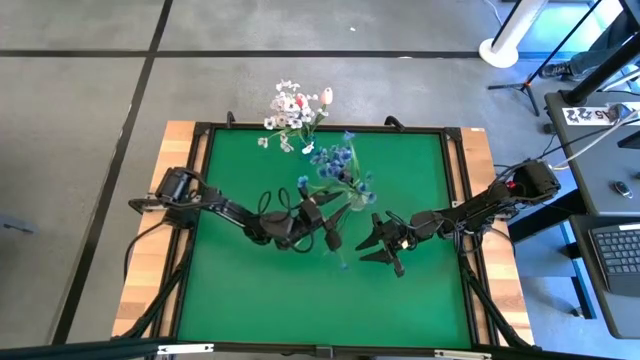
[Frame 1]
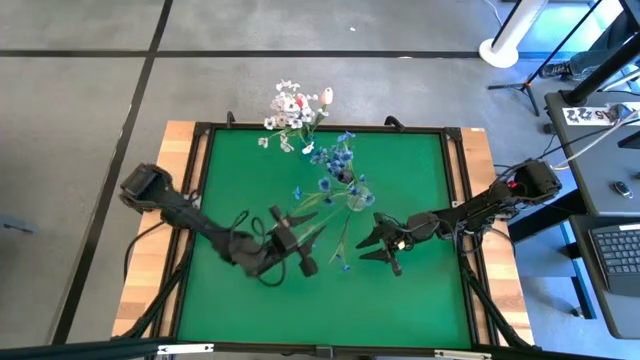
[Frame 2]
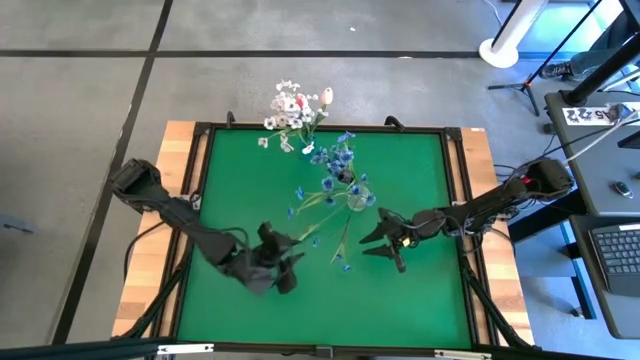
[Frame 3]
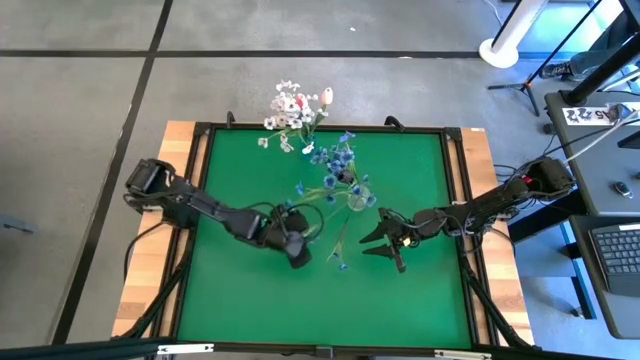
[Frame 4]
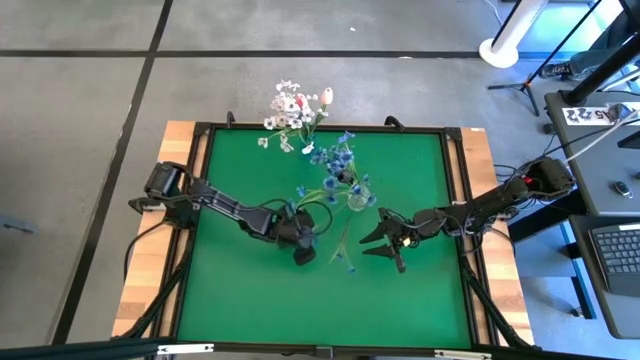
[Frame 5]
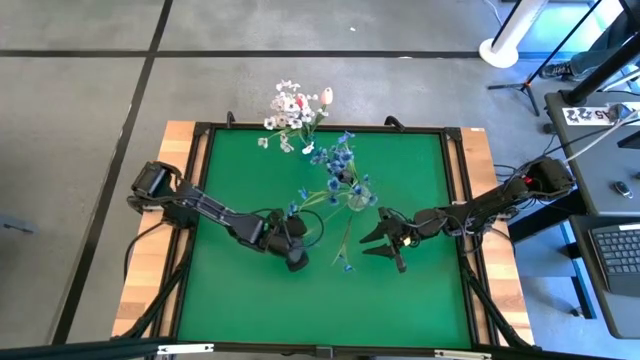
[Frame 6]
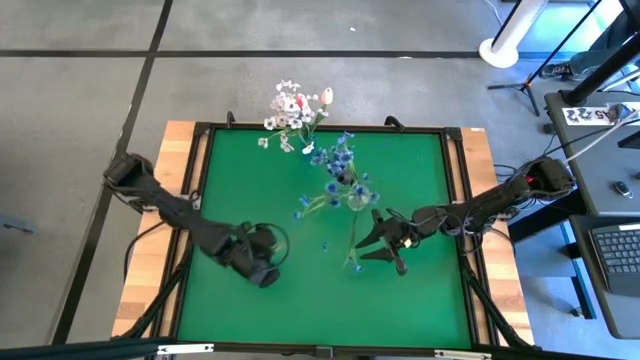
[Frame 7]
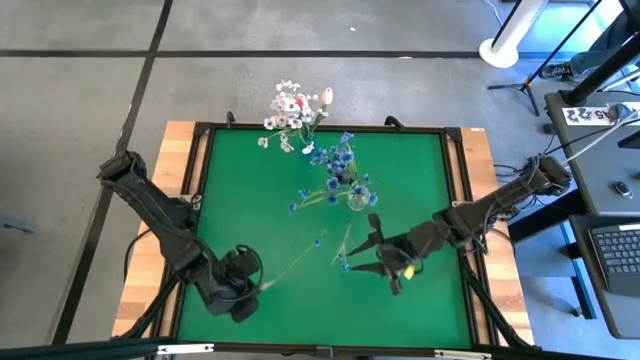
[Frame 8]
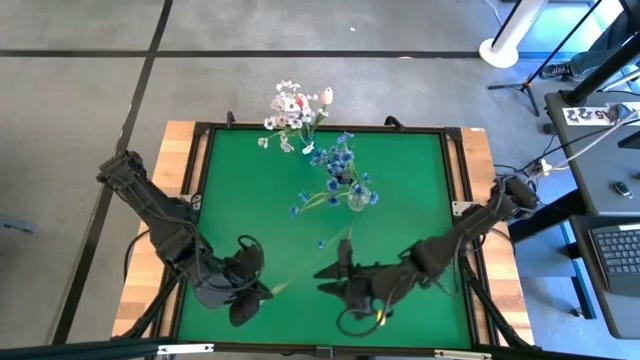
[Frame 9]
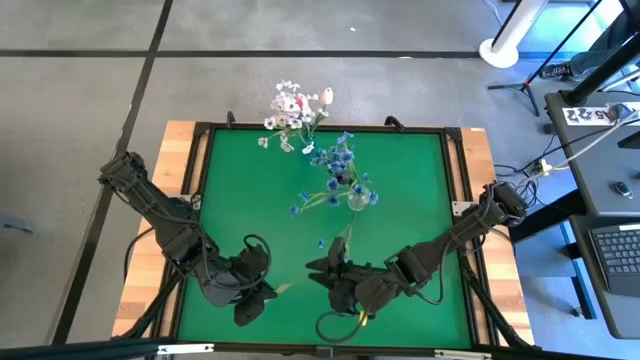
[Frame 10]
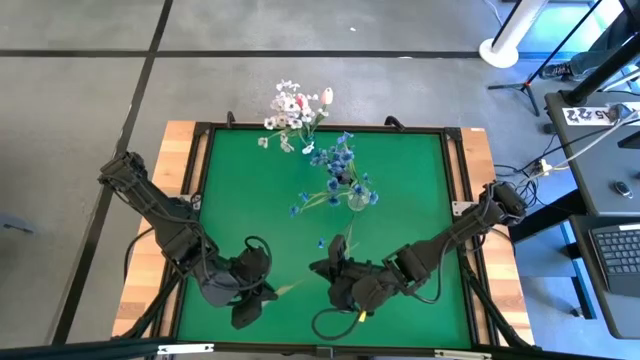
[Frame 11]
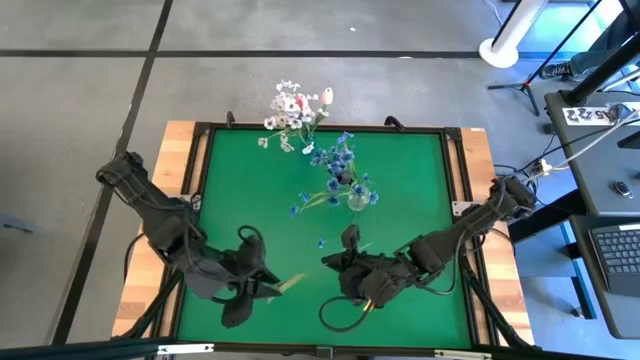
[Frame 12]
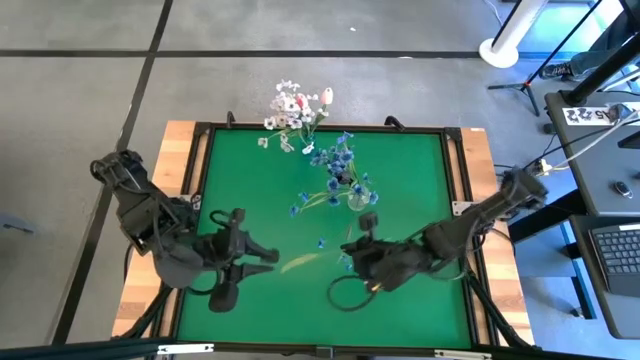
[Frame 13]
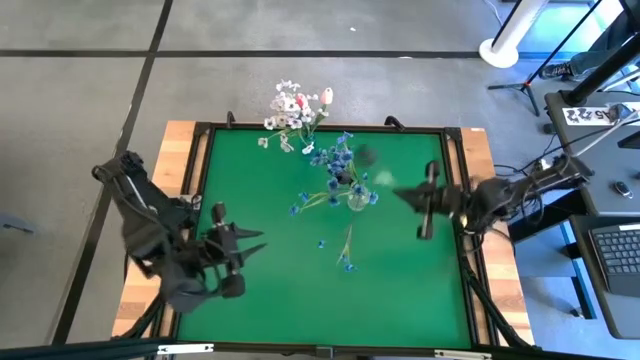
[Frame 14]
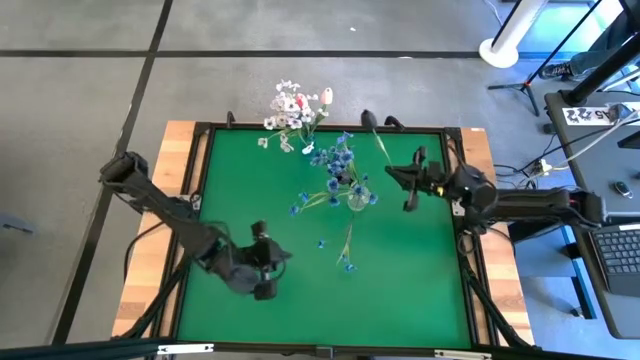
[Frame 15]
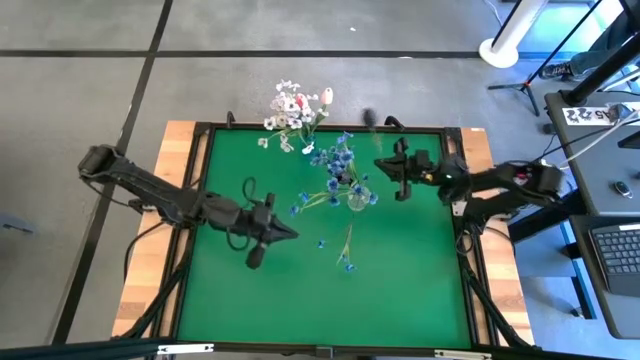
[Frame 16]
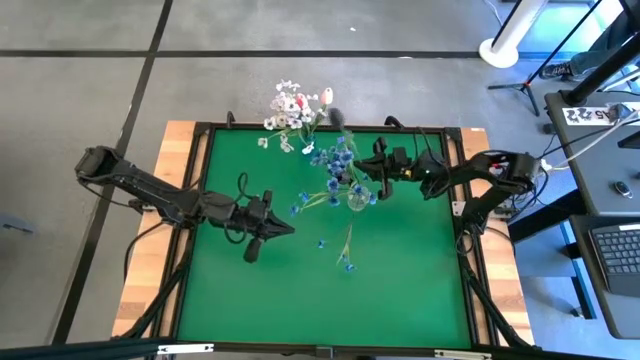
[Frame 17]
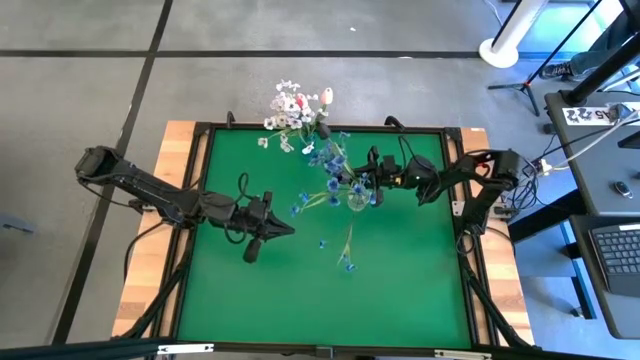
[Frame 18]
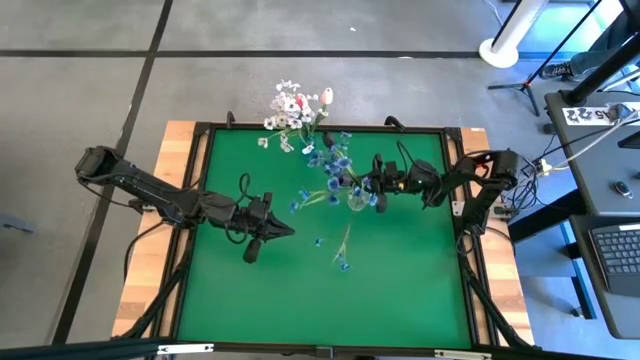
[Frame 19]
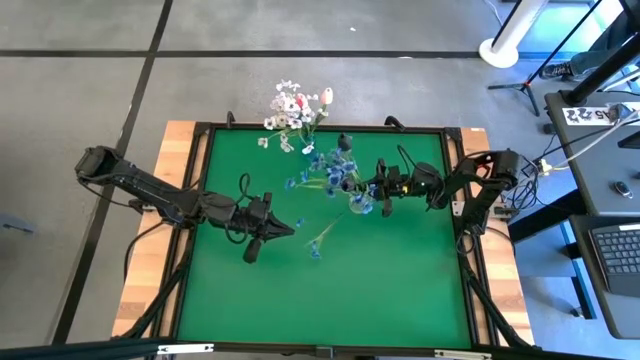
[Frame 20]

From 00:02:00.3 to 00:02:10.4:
Task: Sort flowers into vase by color
Put the black flower into the transparent vase

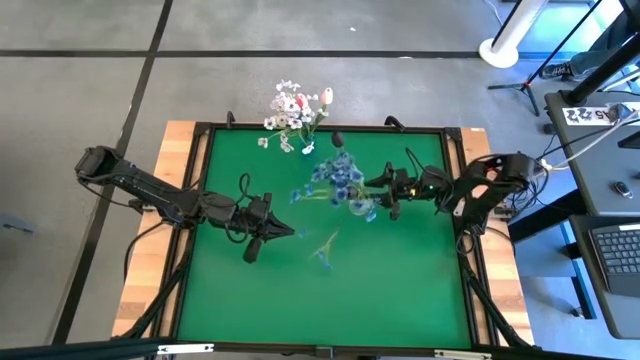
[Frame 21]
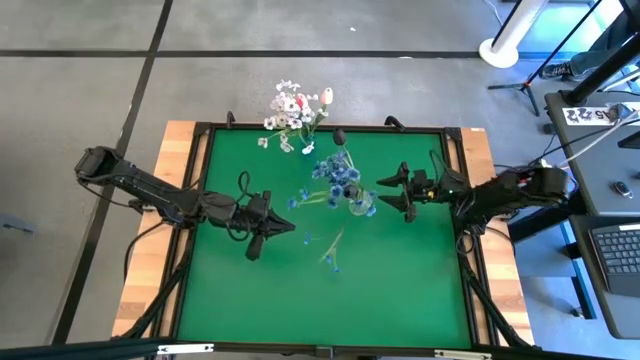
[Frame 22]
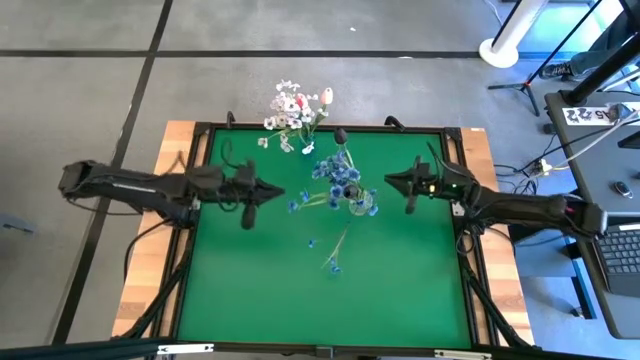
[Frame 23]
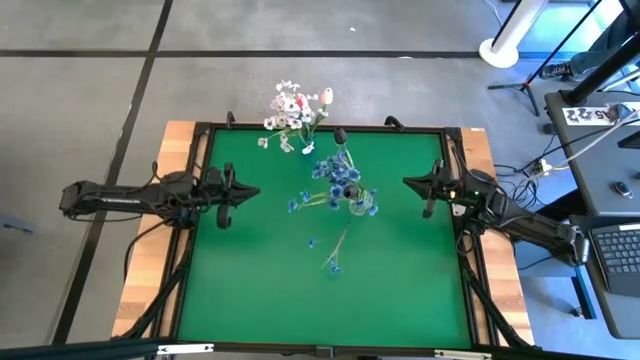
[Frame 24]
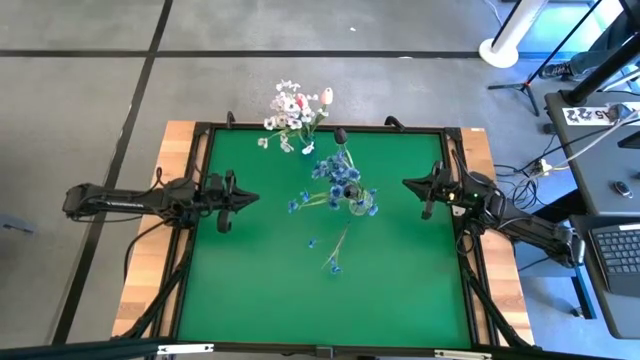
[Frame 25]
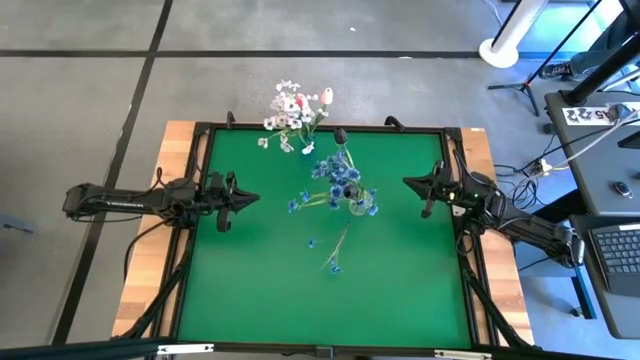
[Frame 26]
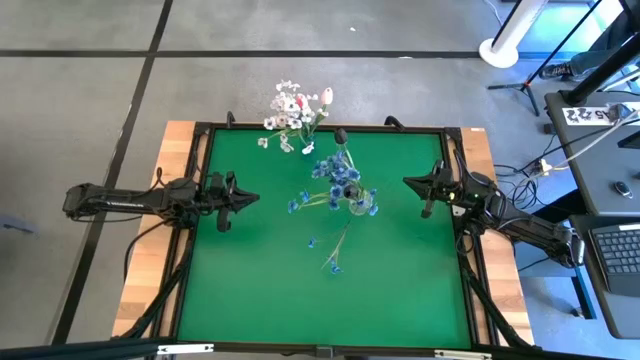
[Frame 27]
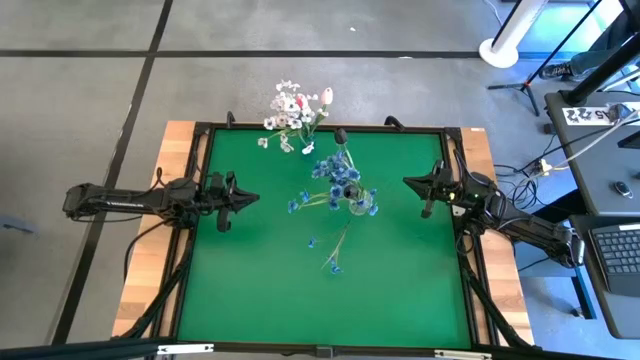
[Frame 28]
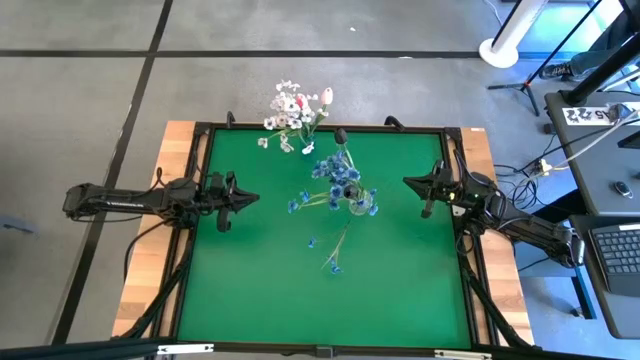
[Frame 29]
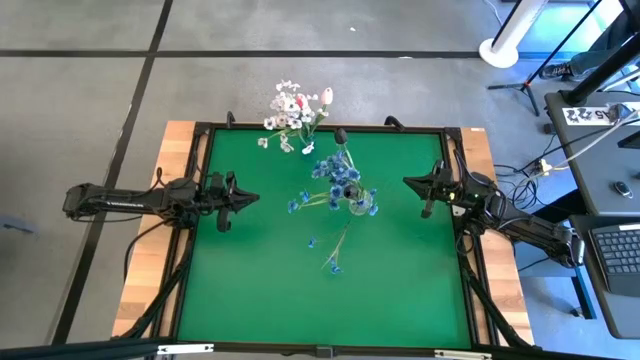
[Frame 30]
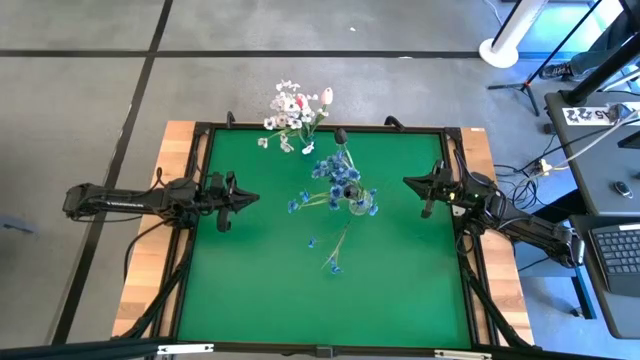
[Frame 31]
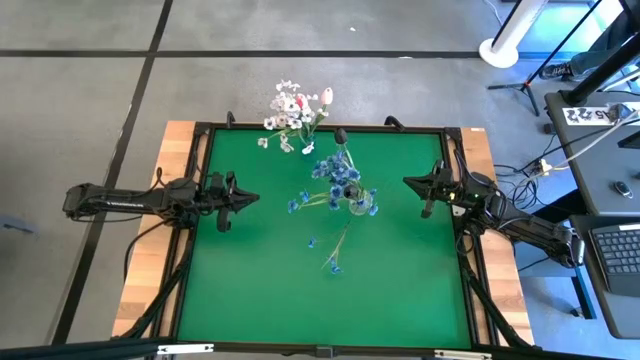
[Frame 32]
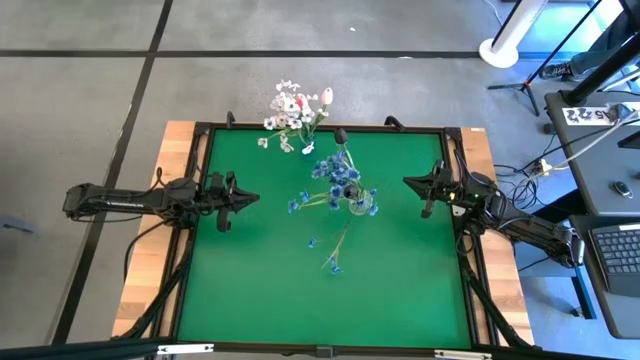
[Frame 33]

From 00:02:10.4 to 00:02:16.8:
Return to Home Position

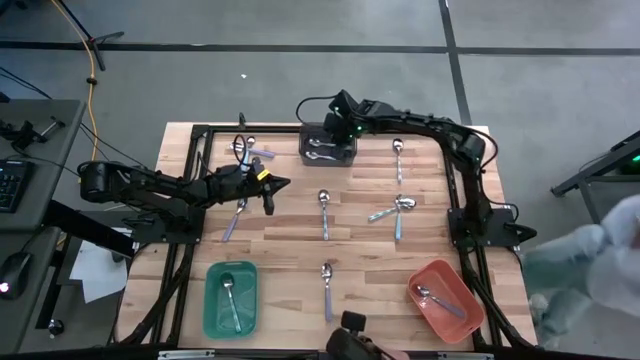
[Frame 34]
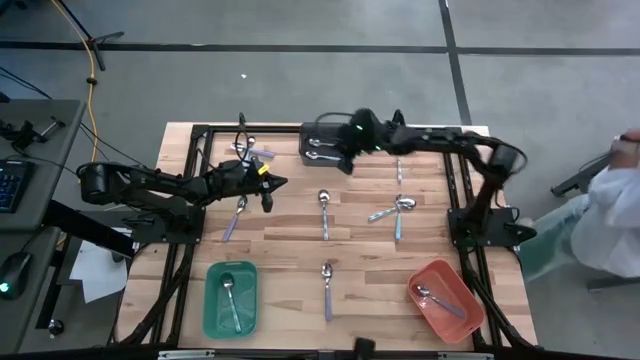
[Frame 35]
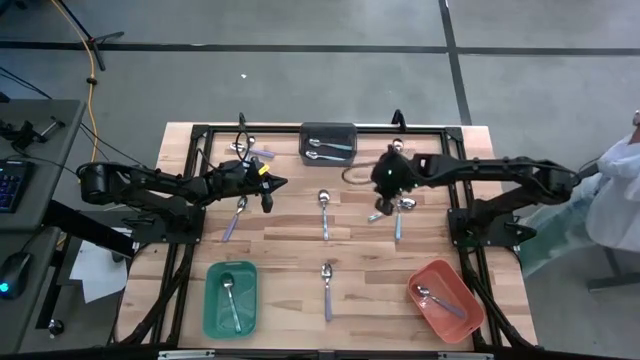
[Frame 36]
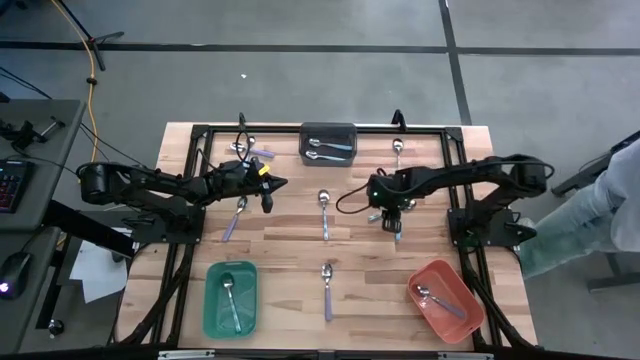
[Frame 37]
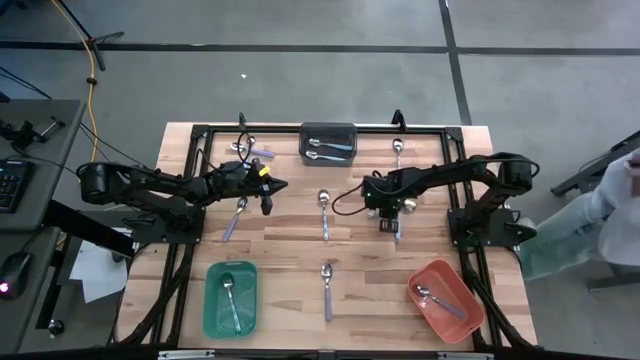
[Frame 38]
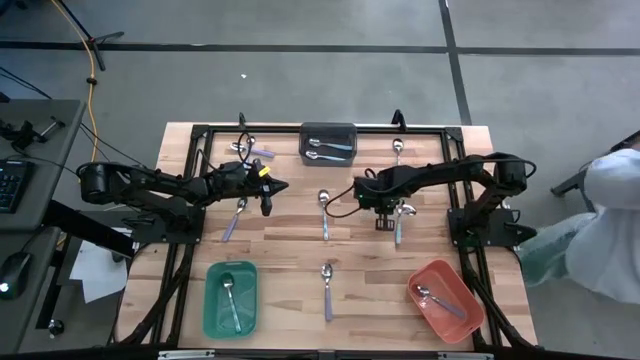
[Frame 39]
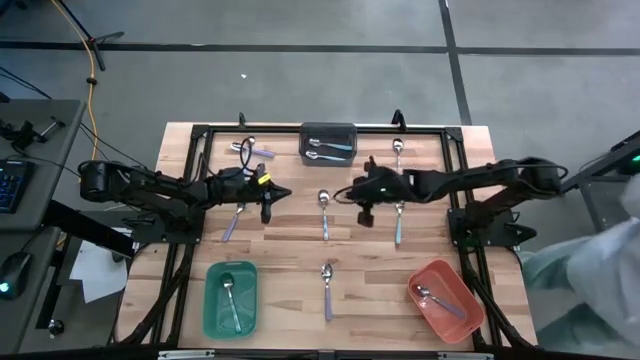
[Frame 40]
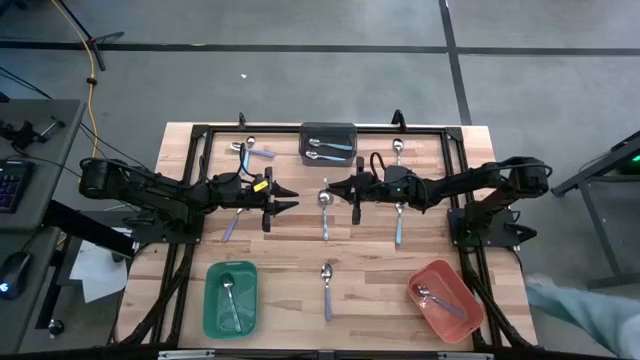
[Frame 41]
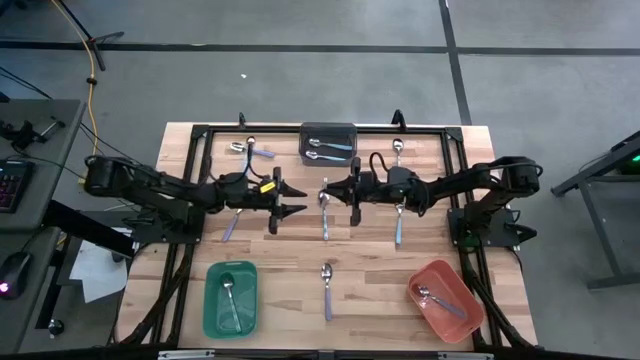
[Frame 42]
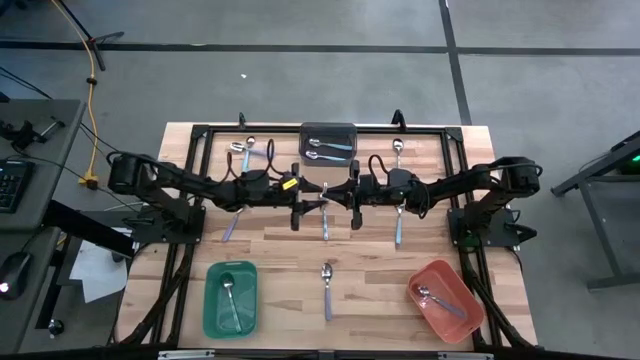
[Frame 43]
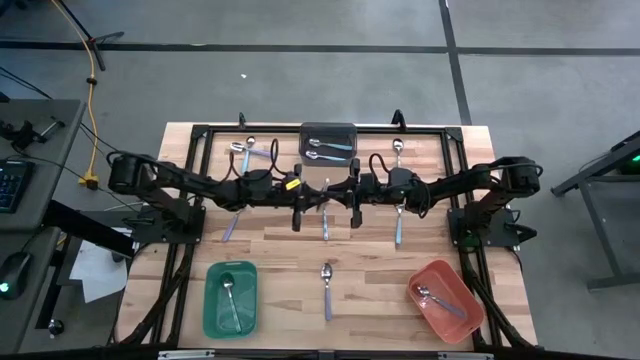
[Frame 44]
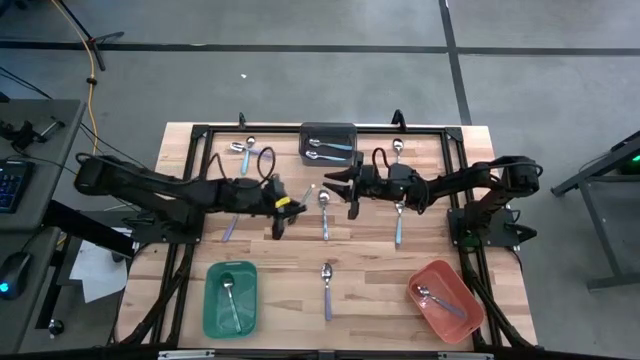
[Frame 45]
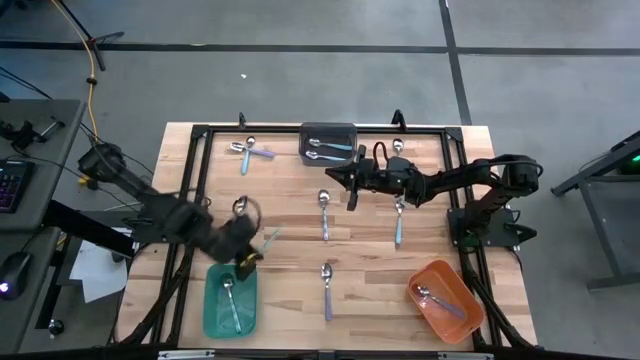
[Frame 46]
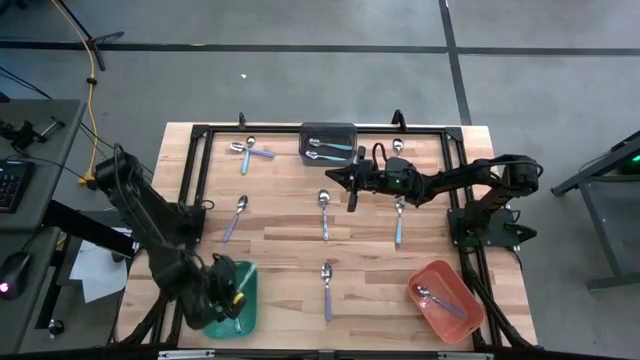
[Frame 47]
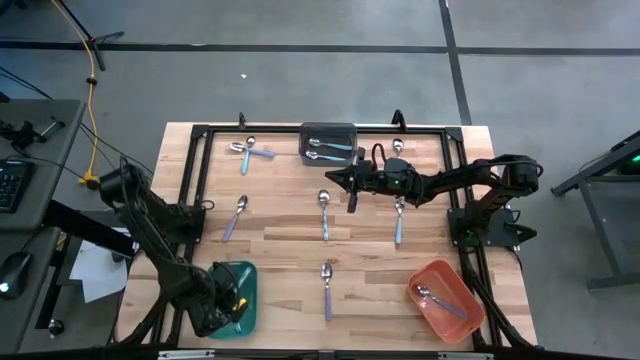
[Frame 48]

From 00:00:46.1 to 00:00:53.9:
Task: Sort silverware by color (type)
Put the white patterned into the green bin
